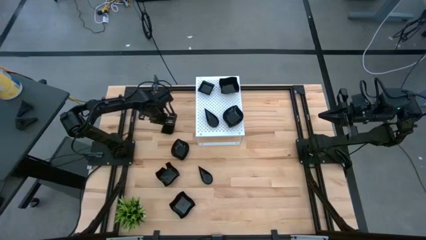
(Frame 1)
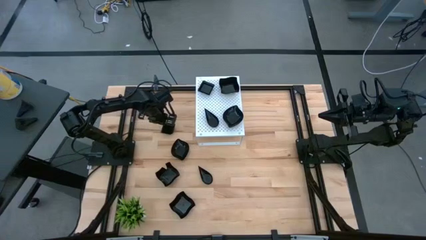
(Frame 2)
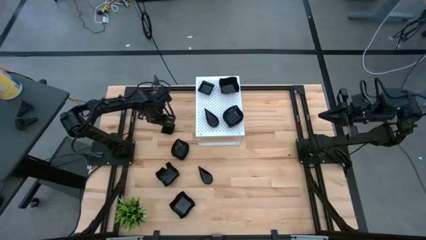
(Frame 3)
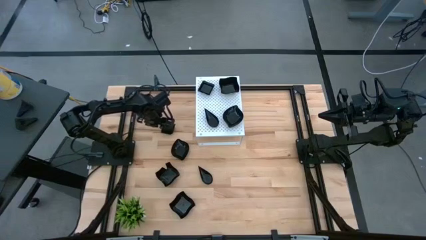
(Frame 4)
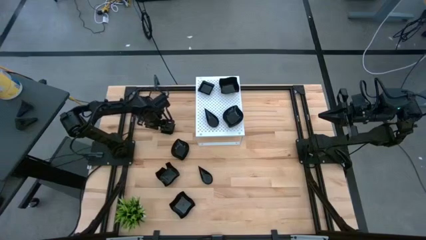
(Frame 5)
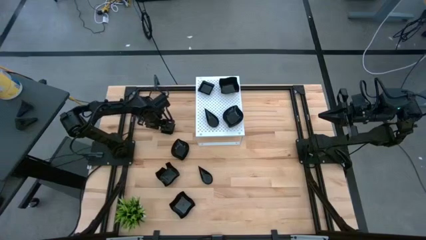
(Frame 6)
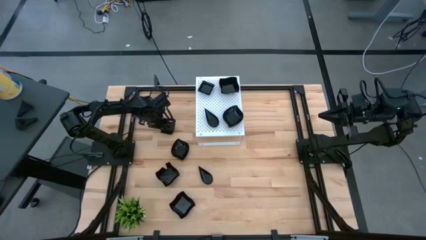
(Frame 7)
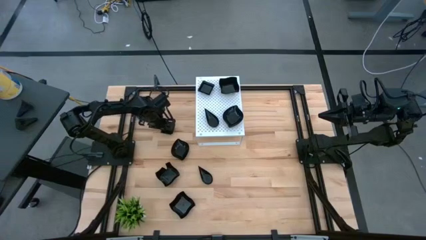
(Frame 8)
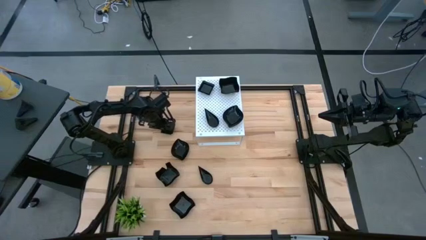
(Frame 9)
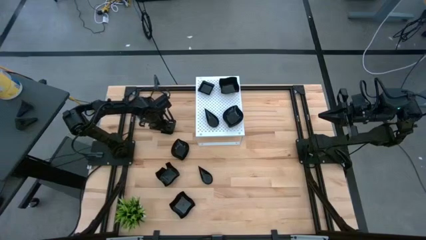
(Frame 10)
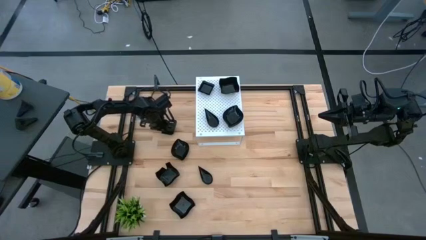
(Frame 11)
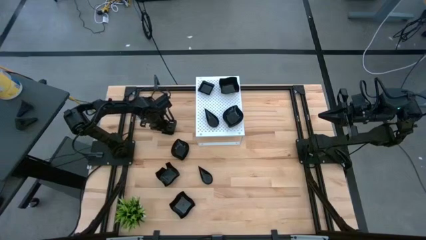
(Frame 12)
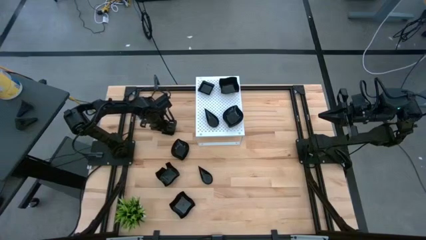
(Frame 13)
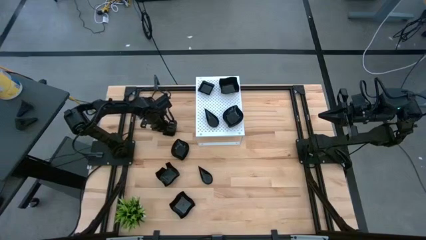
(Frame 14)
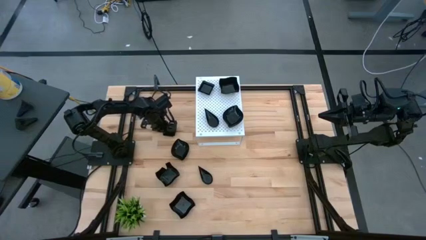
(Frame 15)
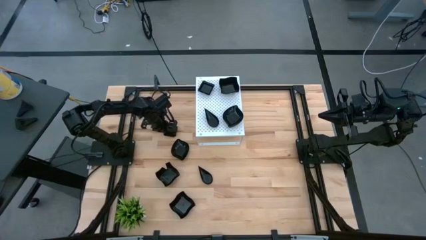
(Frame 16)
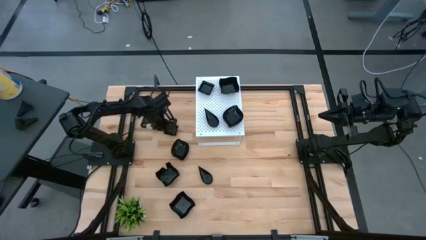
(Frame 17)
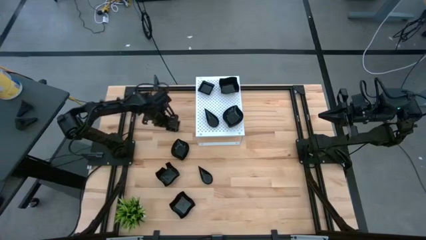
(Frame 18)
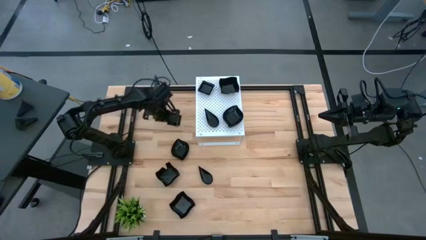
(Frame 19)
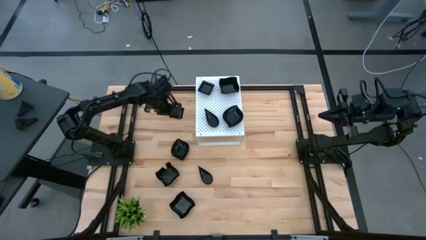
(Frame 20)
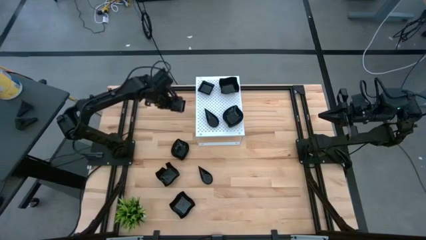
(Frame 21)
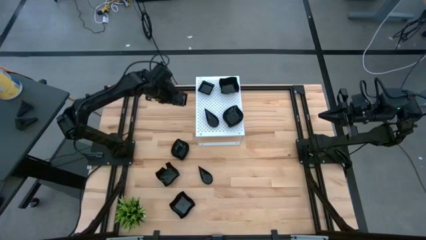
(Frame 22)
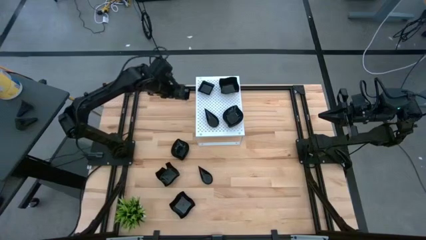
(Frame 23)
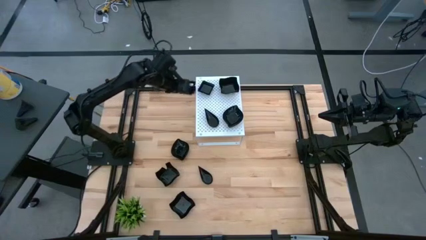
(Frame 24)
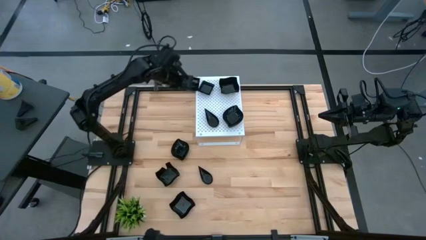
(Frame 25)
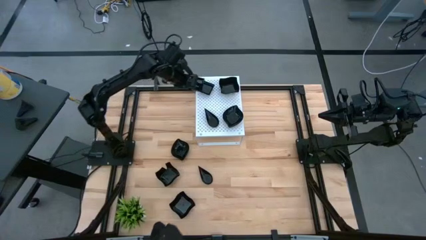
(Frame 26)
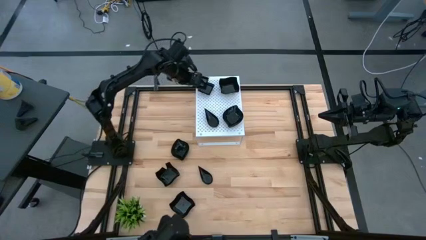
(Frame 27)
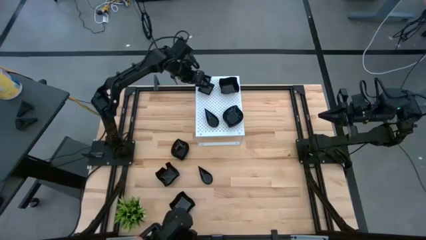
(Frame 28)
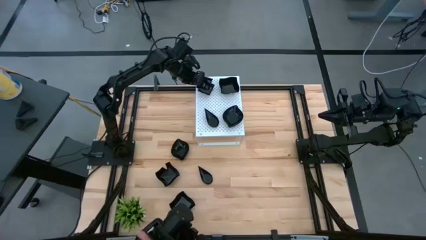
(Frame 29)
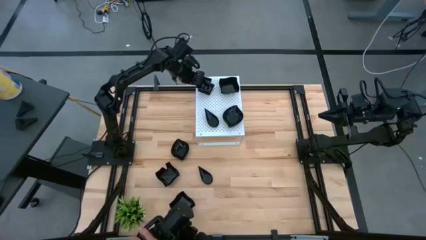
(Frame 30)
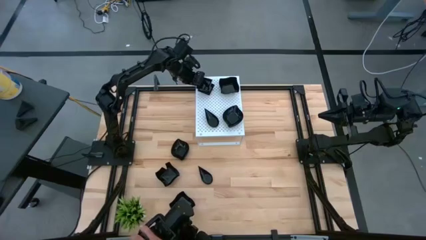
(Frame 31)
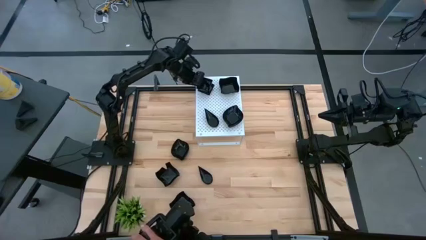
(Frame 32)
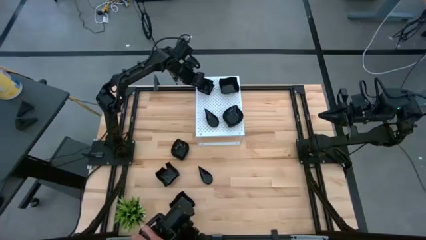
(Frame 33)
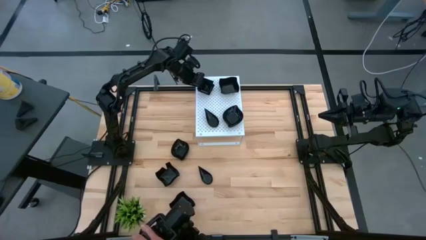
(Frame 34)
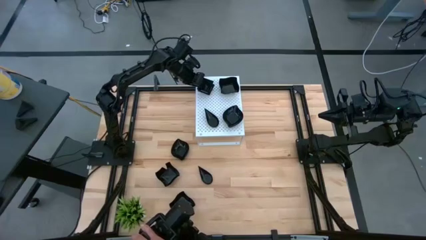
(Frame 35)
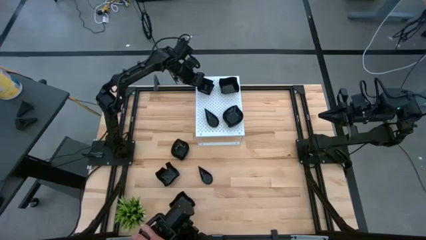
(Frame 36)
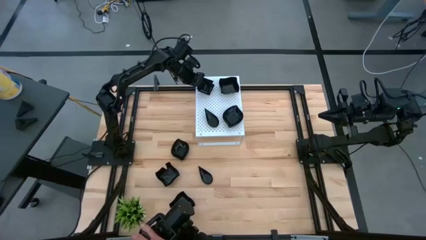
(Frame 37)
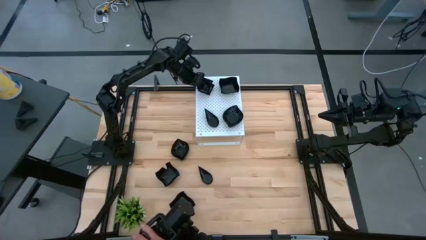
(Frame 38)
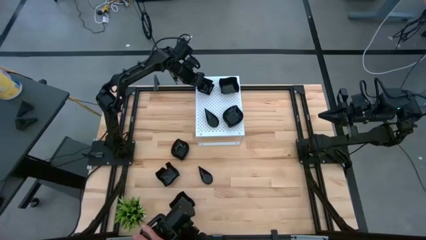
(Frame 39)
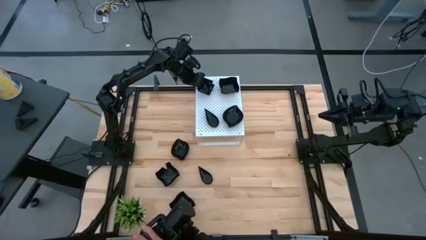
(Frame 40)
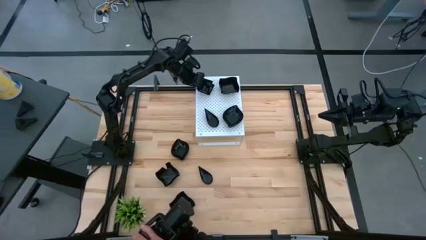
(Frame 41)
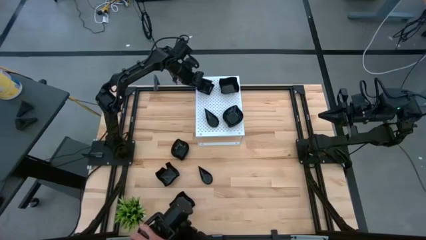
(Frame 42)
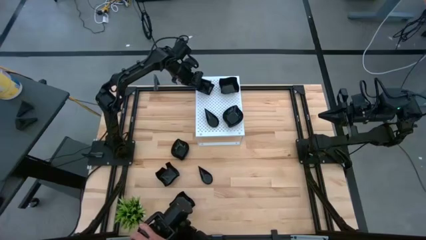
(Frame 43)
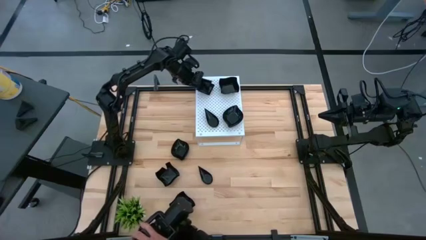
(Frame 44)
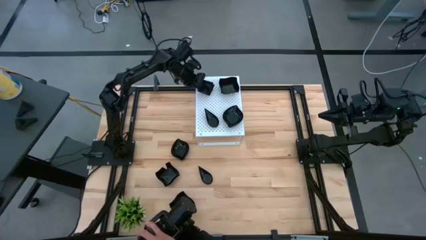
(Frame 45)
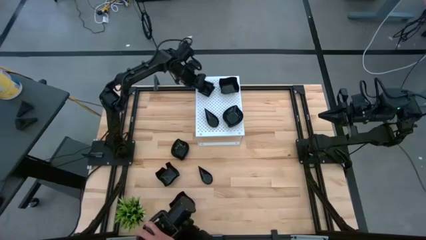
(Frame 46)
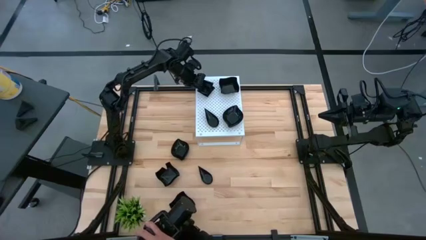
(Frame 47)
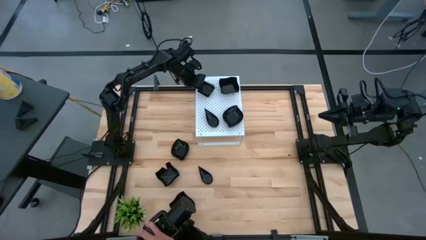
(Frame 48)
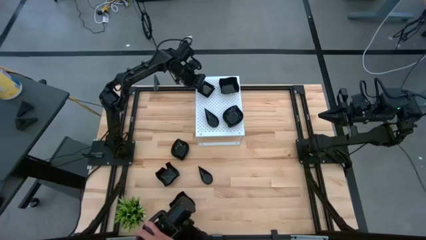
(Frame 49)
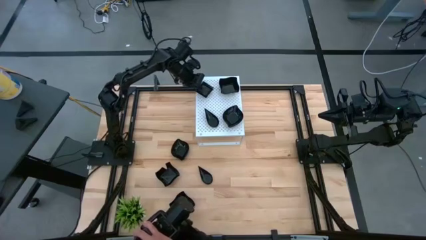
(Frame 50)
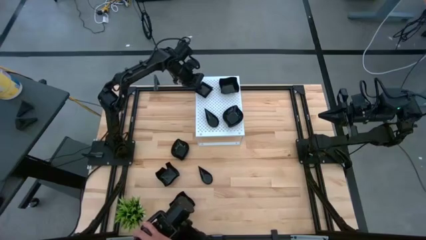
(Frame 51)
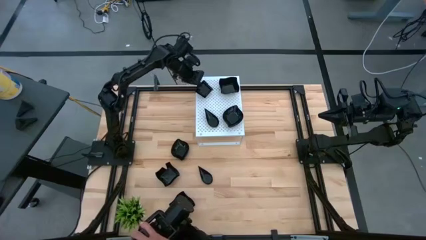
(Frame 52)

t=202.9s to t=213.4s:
Task: Pick & Place Mini shaped plates
Stack the square plate on top of the square plate on the shelf
